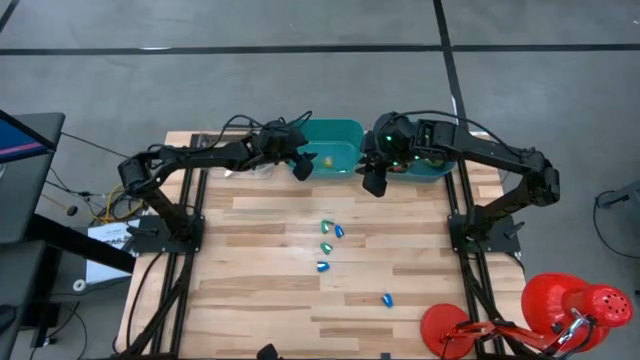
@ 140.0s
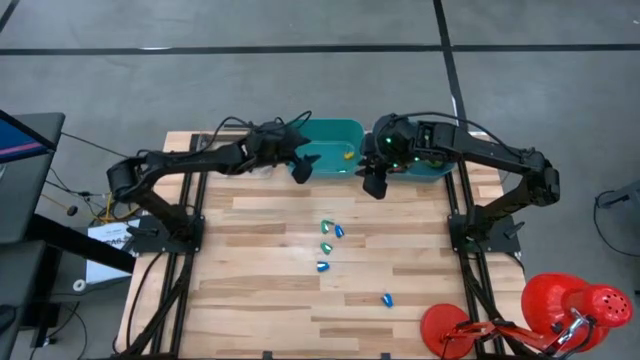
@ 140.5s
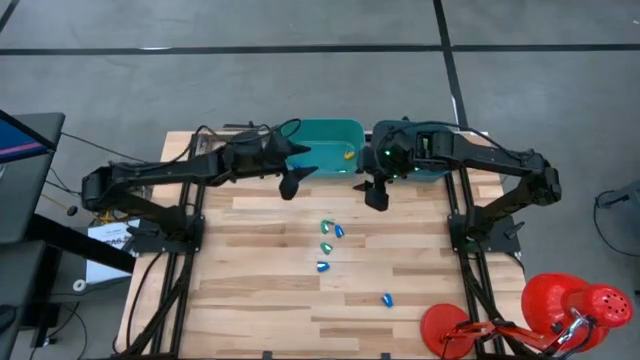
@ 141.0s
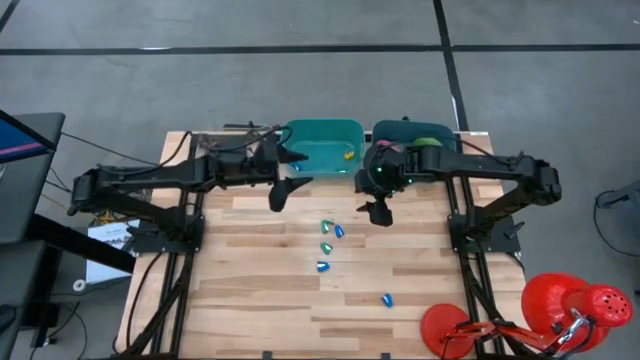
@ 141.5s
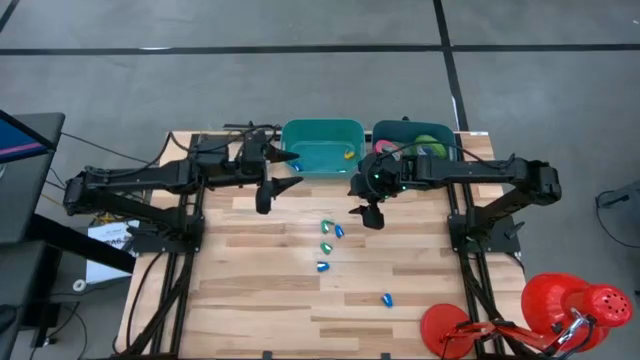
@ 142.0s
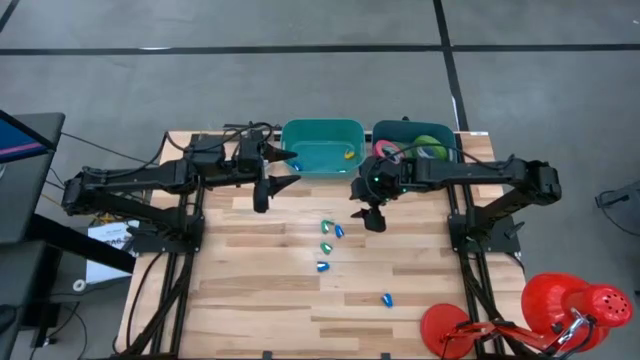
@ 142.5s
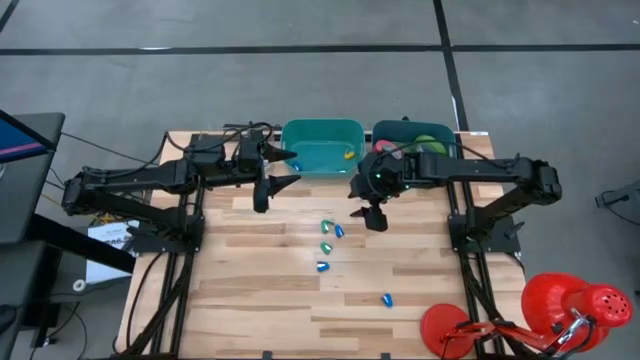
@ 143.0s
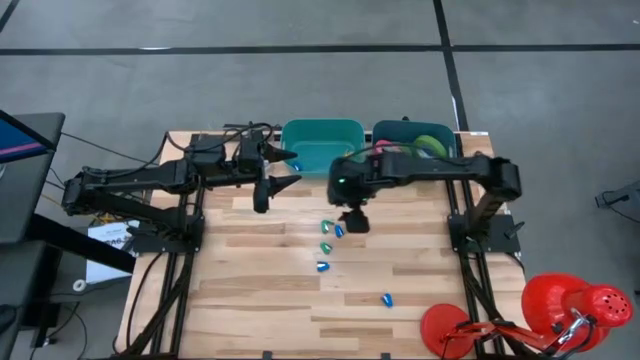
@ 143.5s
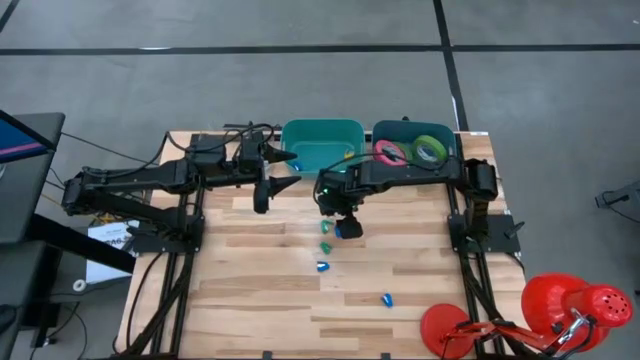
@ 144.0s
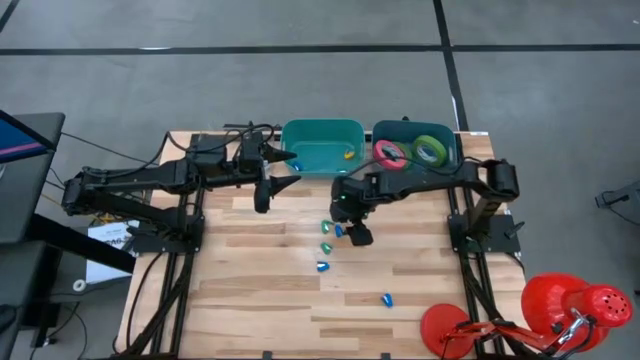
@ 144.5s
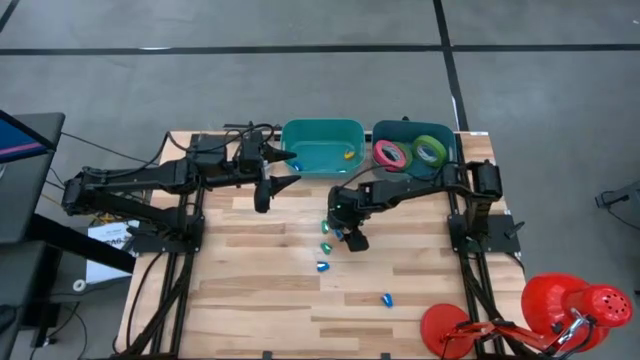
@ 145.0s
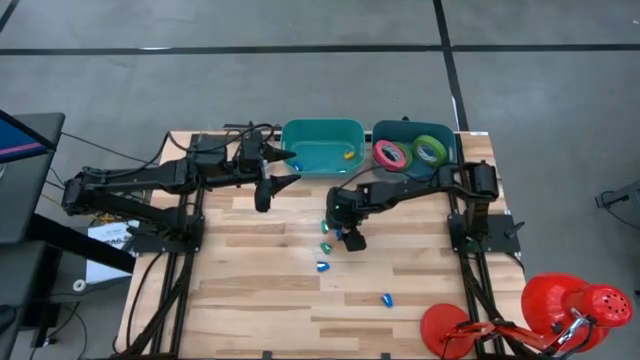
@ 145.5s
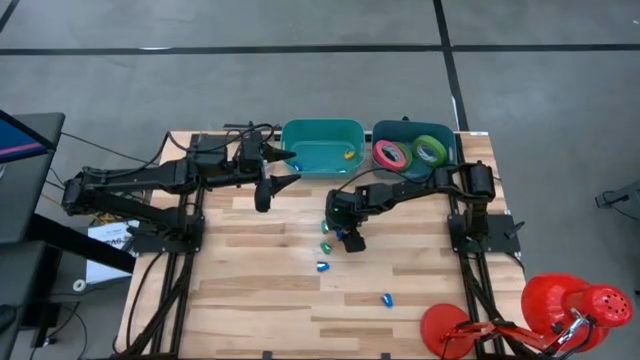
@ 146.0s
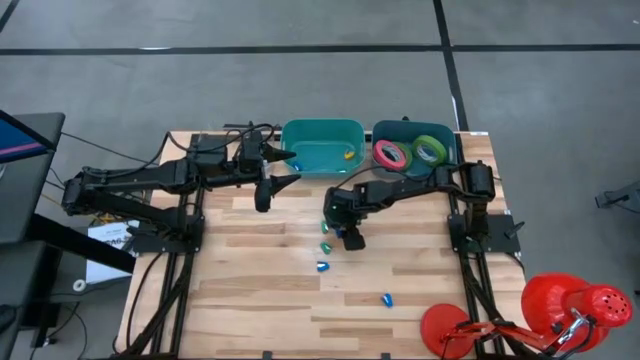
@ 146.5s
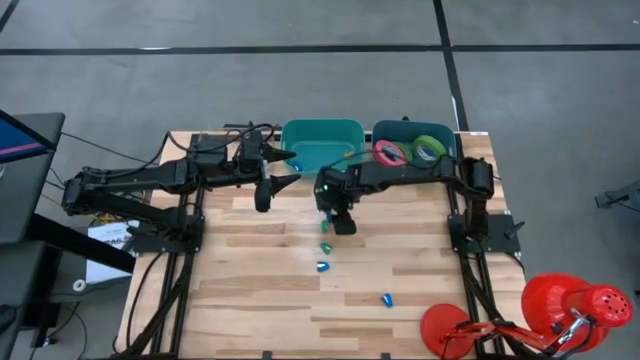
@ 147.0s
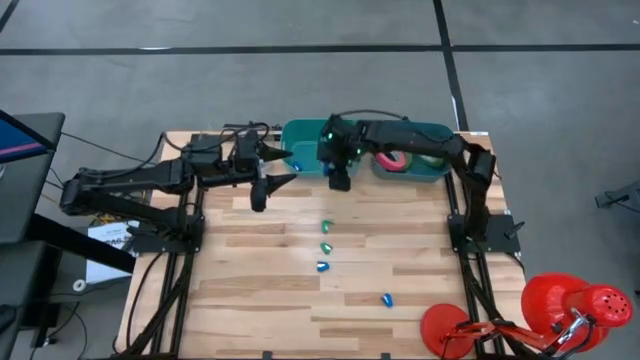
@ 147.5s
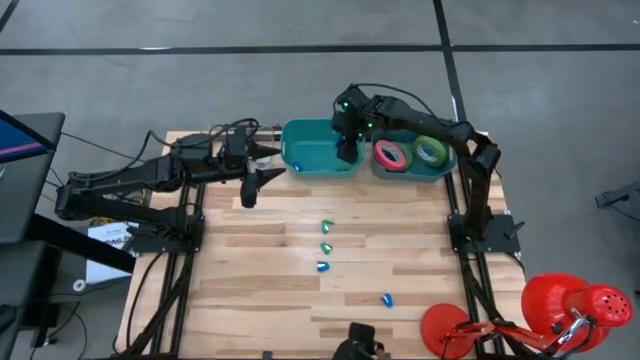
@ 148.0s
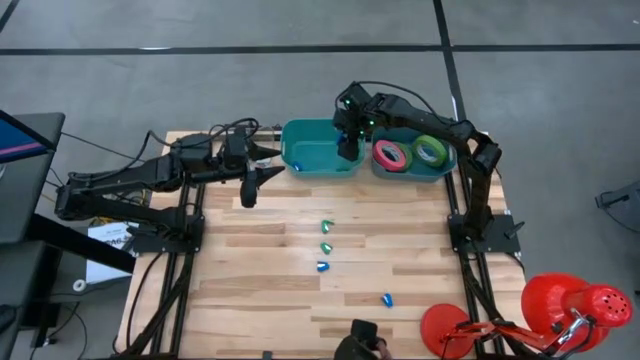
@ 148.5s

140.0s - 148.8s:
Task: Pick and place Stapler, Stapler remover, tape
Put the blue stapler into the green bin

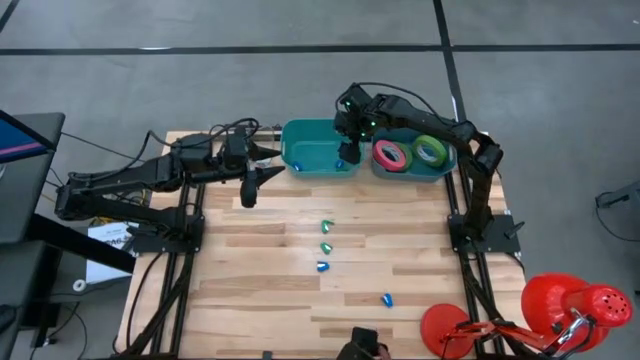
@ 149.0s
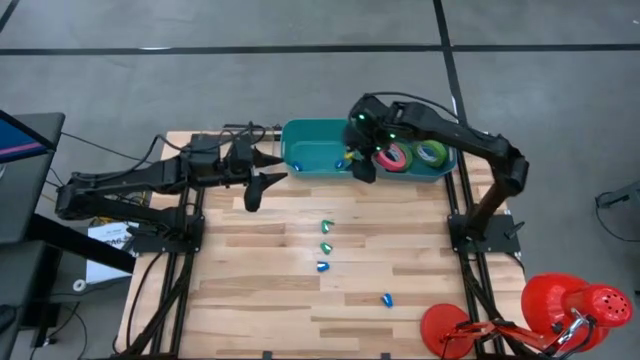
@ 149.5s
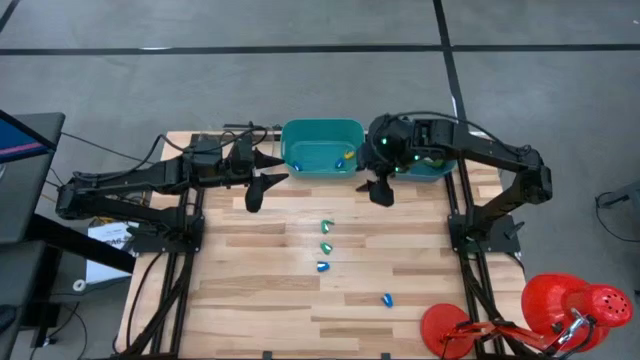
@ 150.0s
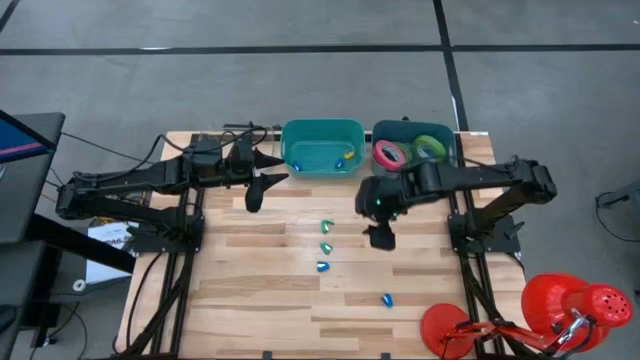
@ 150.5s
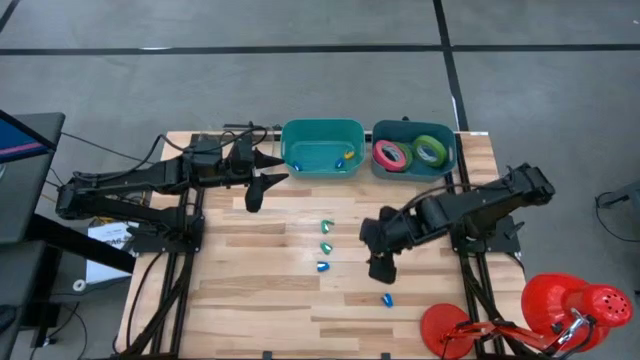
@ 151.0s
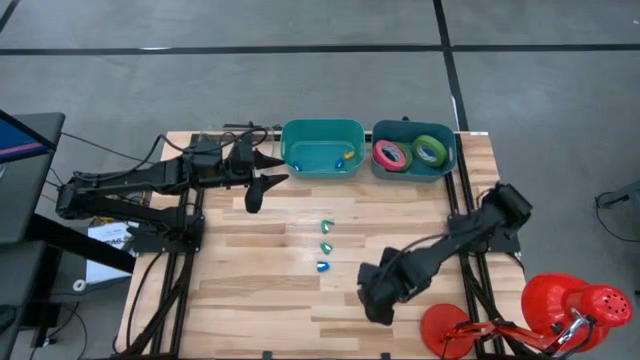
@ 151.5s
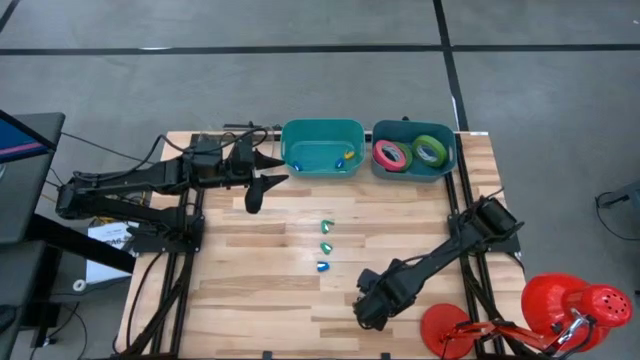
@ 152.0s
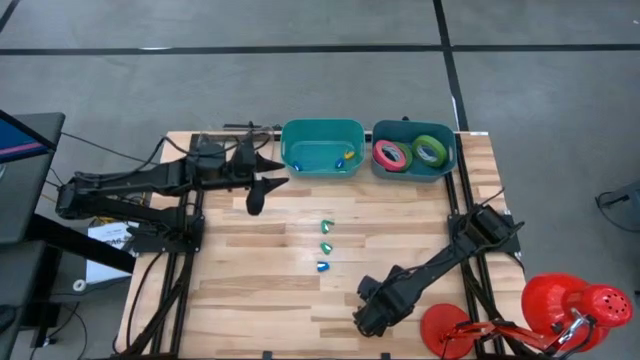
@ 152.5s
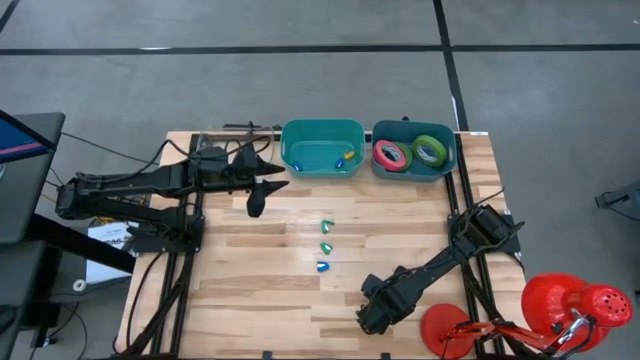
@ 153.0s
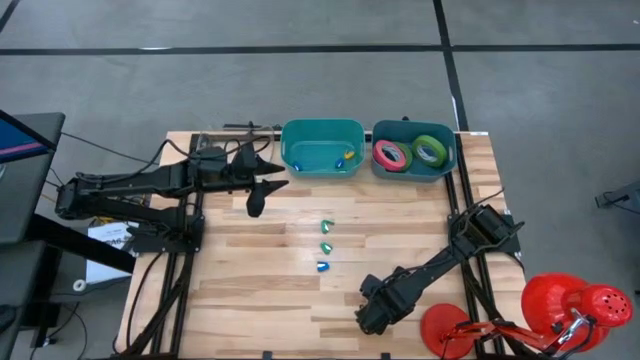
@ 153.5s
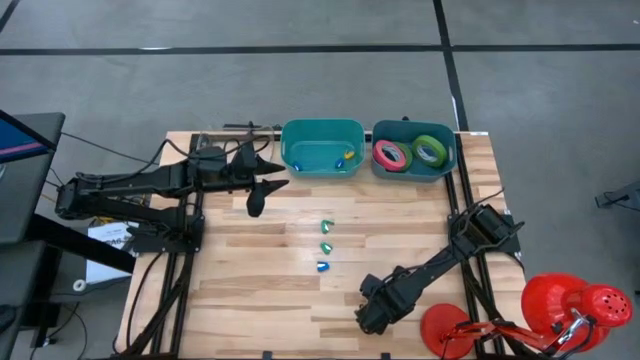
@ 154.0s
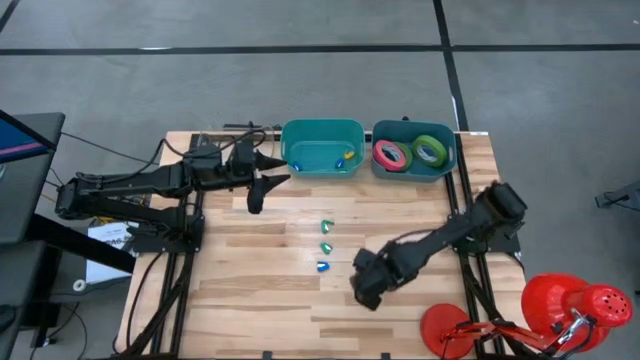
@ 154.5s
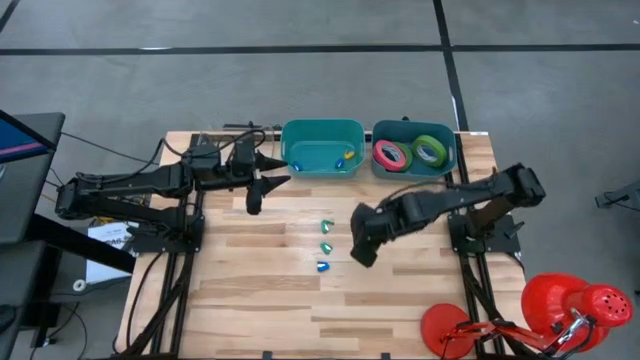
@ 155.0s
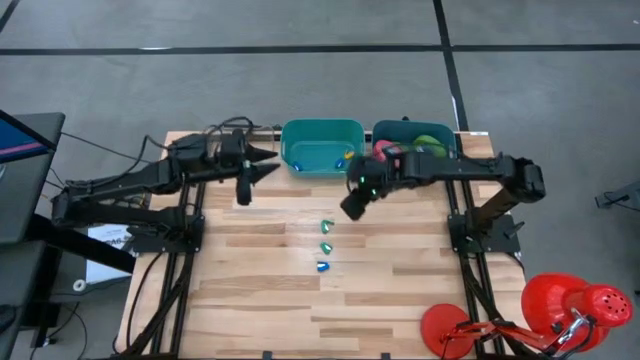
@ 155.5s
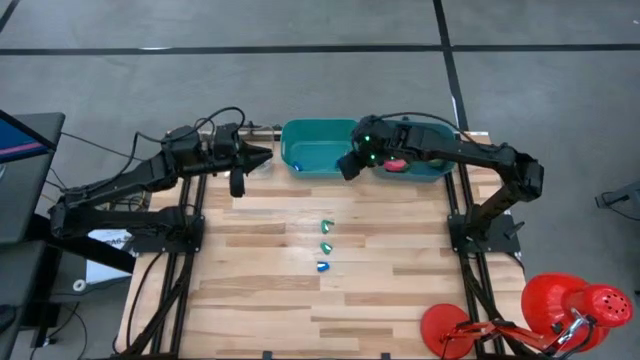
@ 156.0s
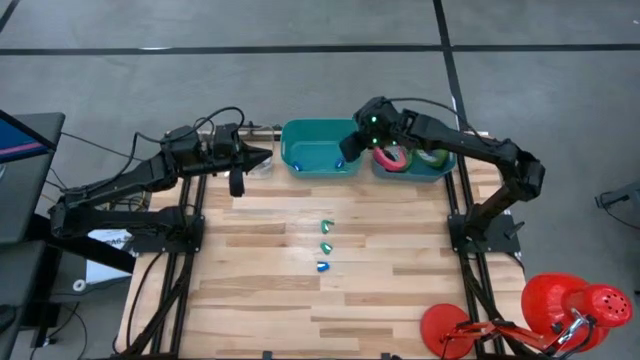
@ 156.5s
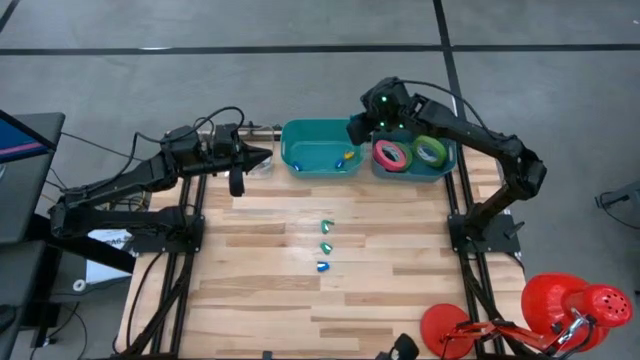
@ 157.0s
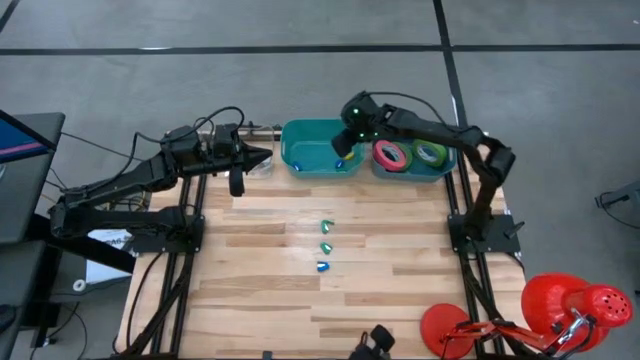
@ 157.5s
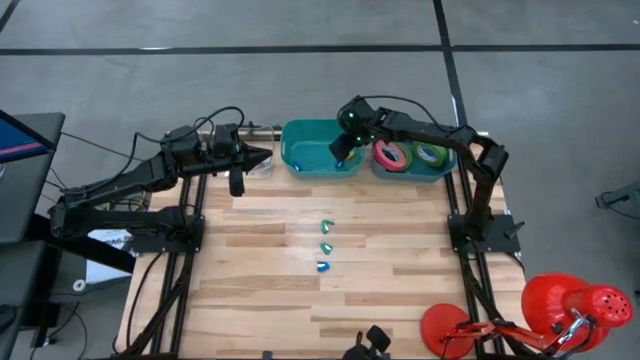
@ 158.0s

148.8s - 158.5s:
Put the blue stapler into the green bin
